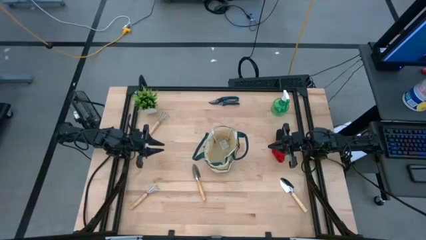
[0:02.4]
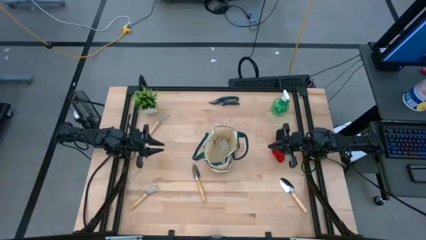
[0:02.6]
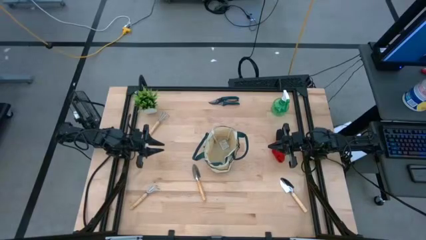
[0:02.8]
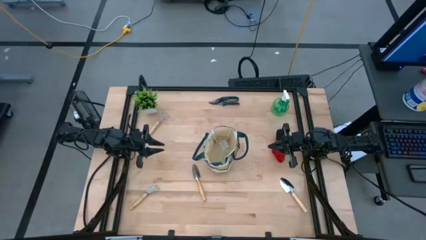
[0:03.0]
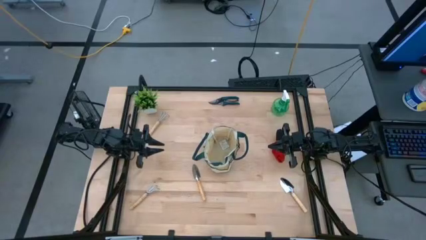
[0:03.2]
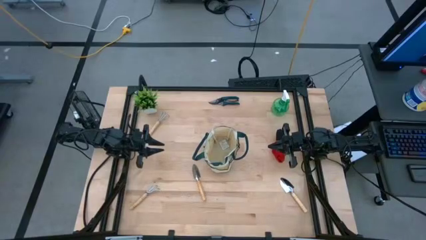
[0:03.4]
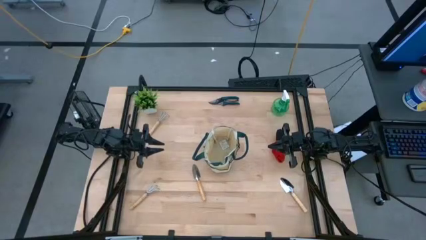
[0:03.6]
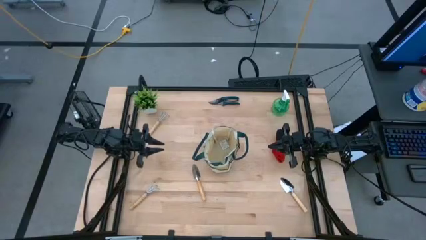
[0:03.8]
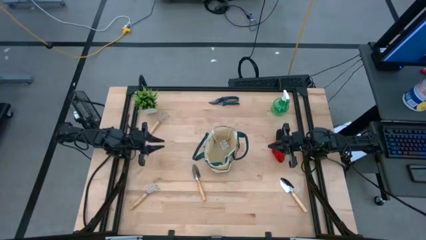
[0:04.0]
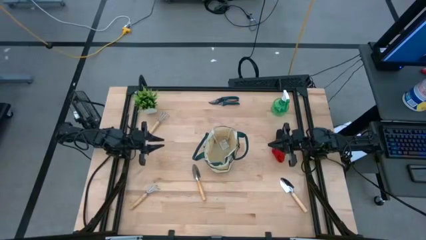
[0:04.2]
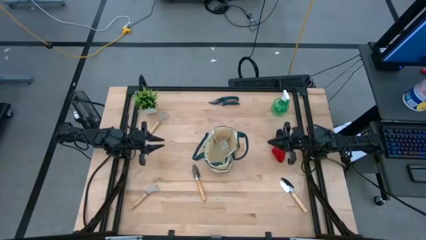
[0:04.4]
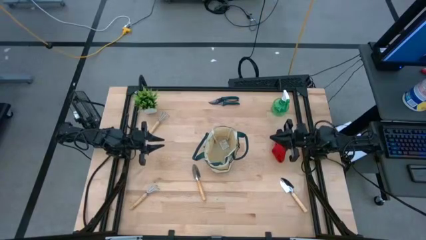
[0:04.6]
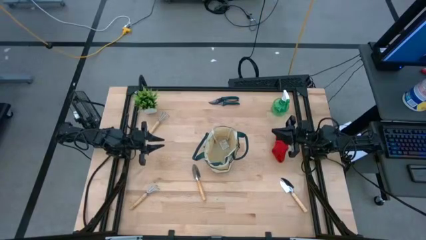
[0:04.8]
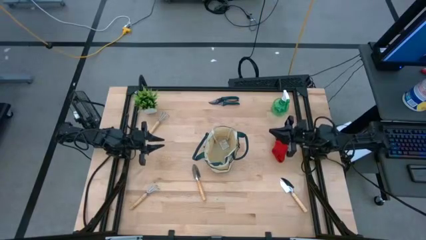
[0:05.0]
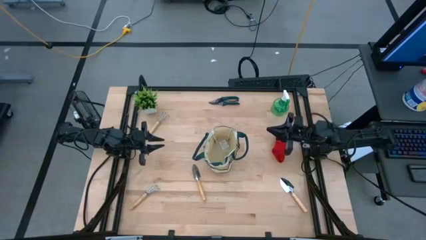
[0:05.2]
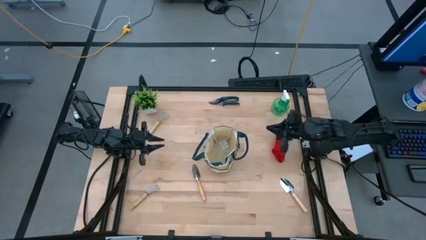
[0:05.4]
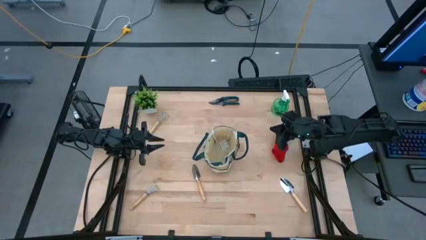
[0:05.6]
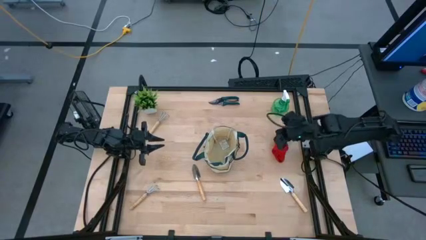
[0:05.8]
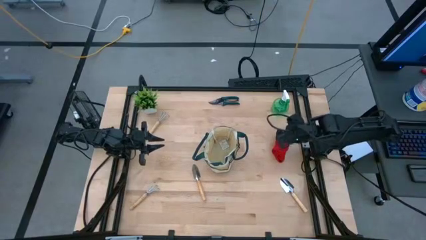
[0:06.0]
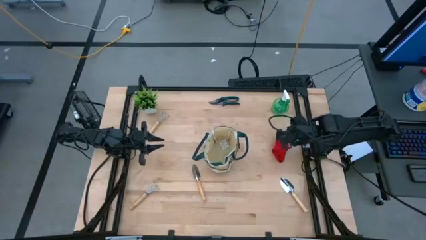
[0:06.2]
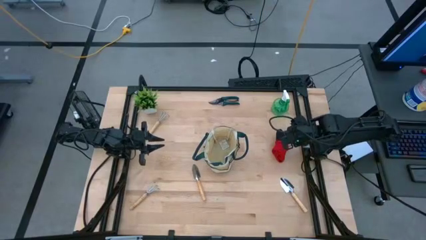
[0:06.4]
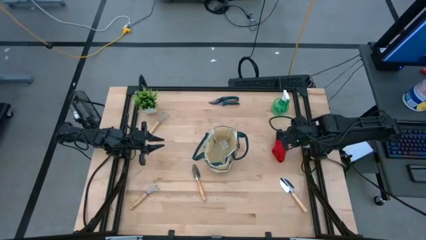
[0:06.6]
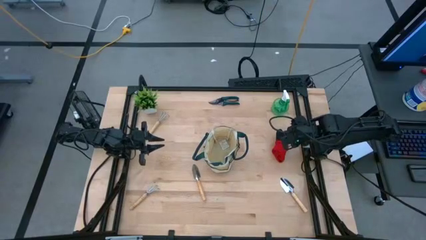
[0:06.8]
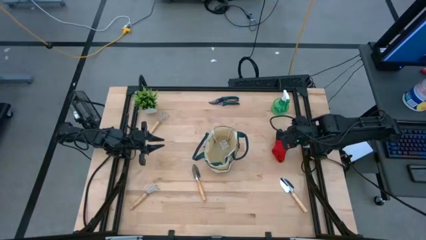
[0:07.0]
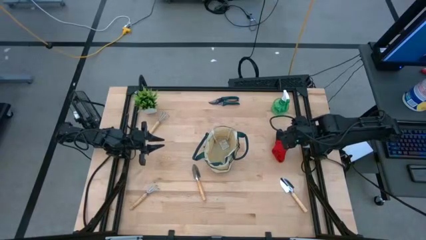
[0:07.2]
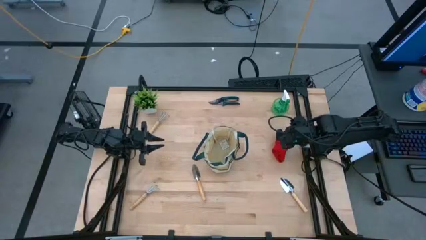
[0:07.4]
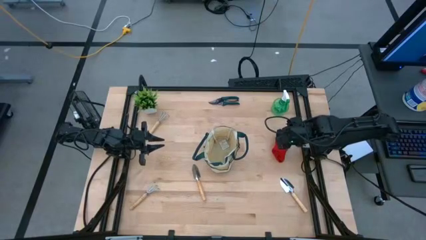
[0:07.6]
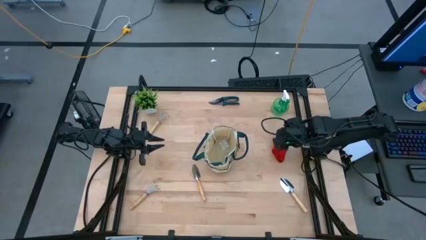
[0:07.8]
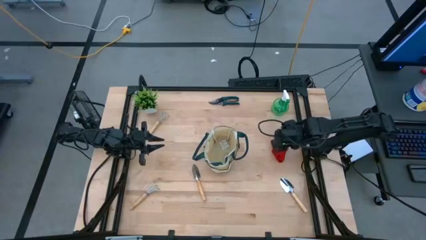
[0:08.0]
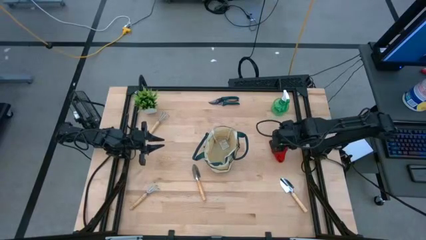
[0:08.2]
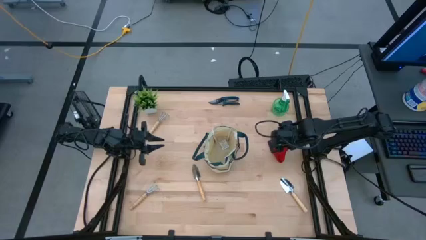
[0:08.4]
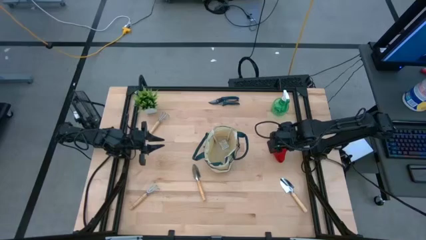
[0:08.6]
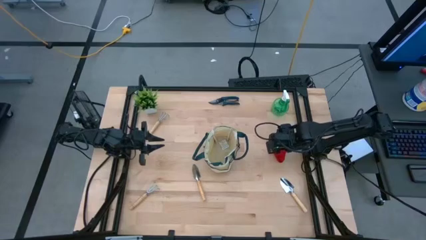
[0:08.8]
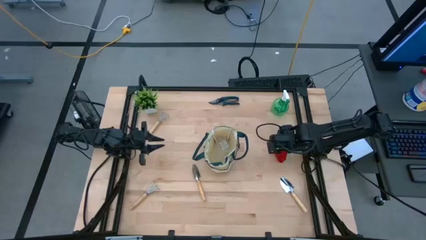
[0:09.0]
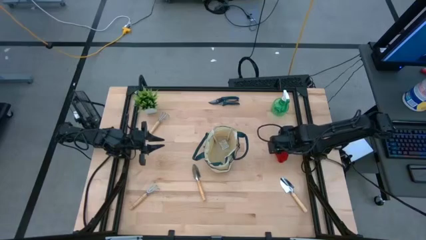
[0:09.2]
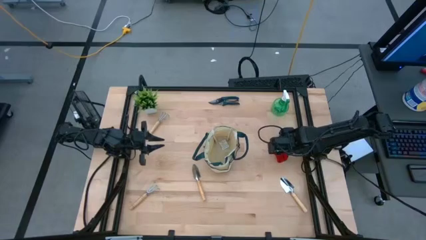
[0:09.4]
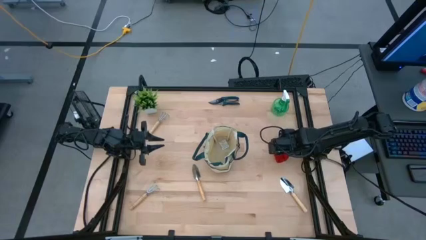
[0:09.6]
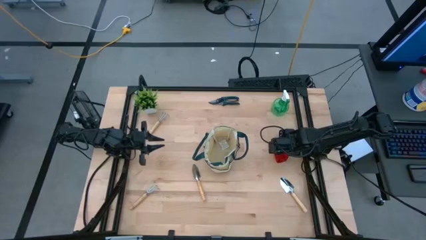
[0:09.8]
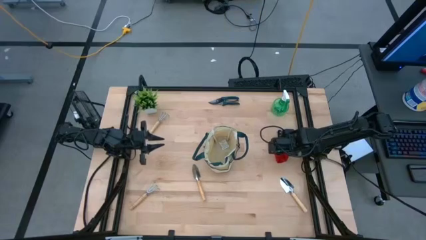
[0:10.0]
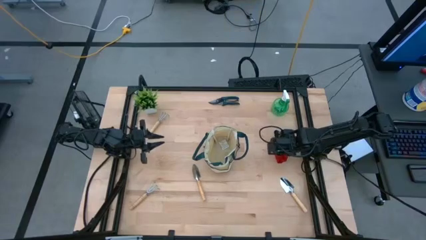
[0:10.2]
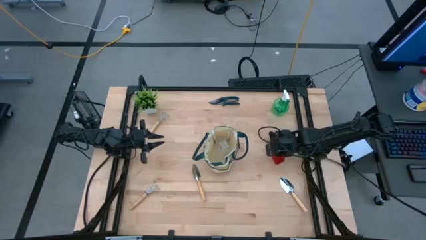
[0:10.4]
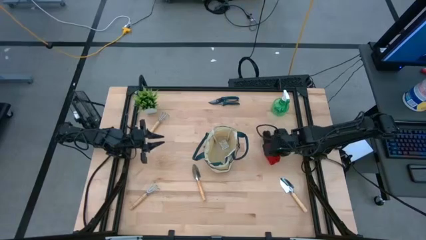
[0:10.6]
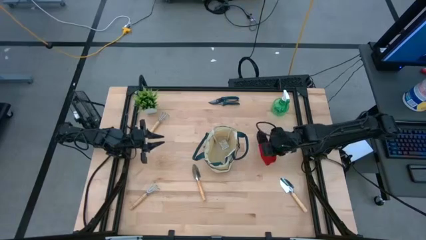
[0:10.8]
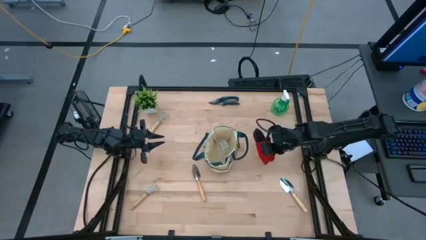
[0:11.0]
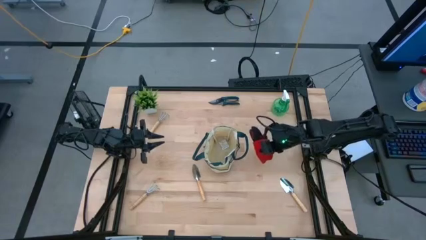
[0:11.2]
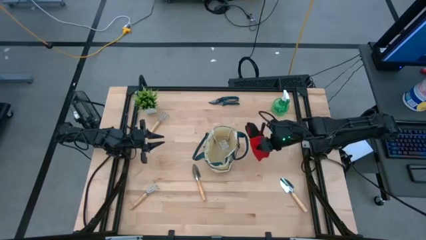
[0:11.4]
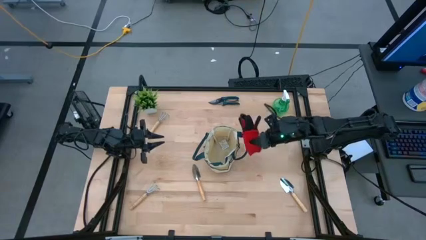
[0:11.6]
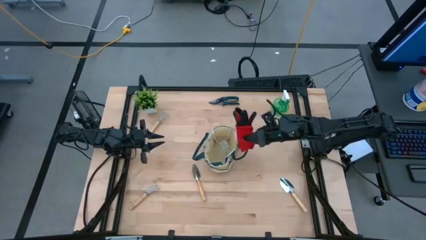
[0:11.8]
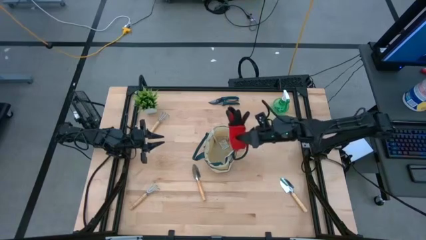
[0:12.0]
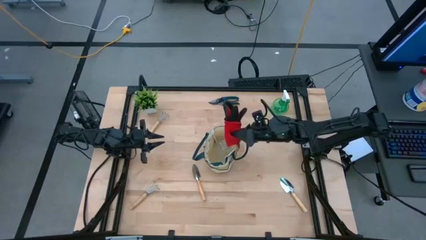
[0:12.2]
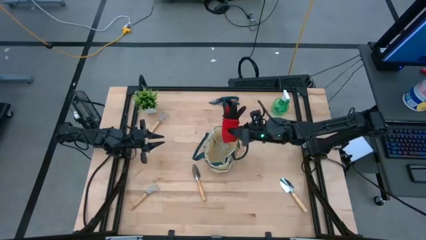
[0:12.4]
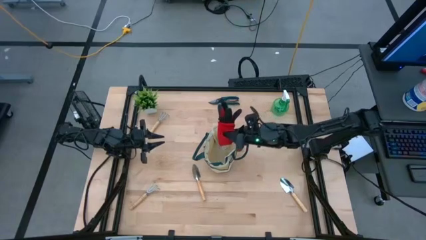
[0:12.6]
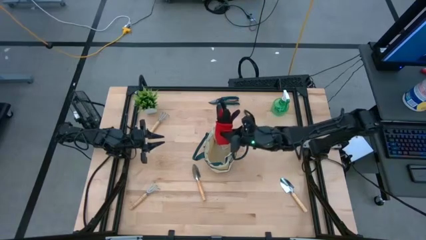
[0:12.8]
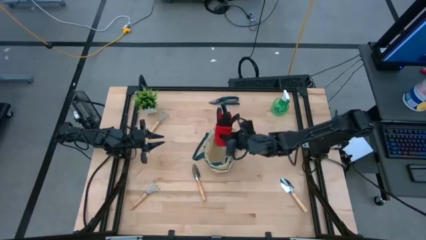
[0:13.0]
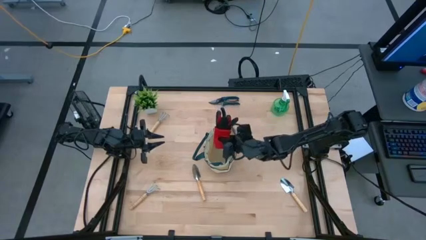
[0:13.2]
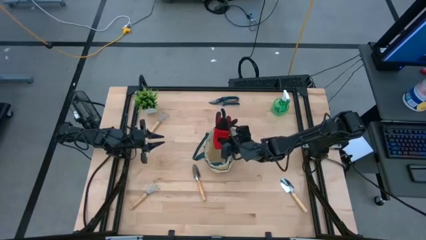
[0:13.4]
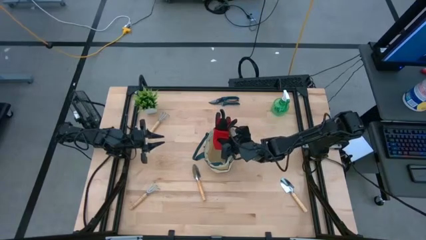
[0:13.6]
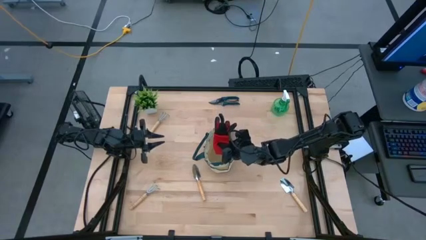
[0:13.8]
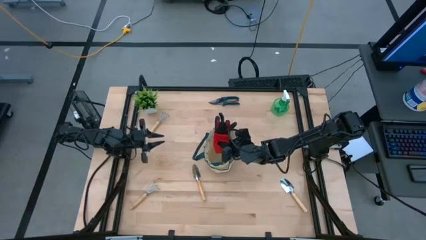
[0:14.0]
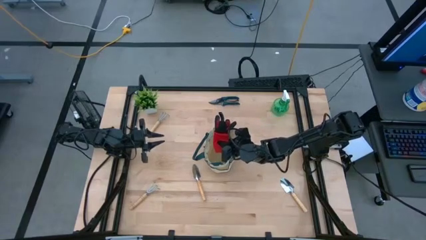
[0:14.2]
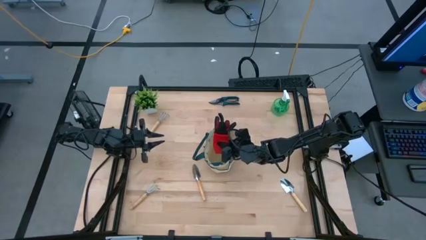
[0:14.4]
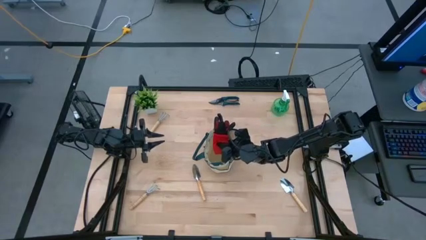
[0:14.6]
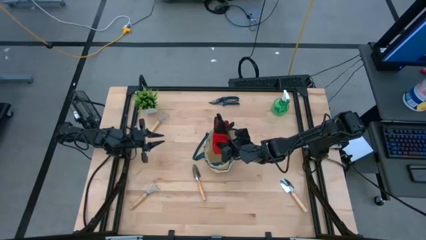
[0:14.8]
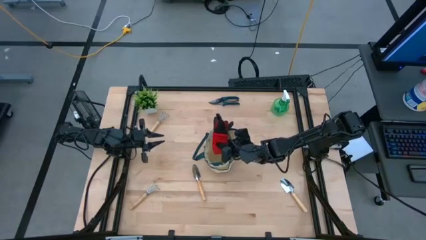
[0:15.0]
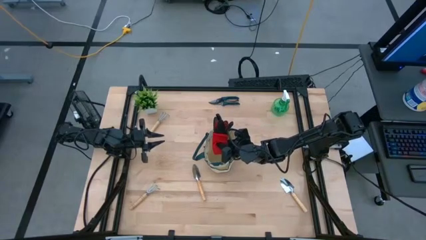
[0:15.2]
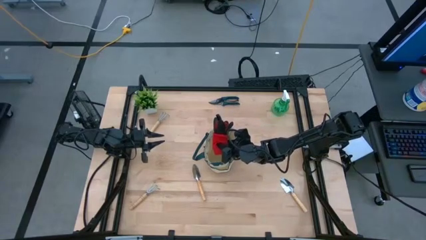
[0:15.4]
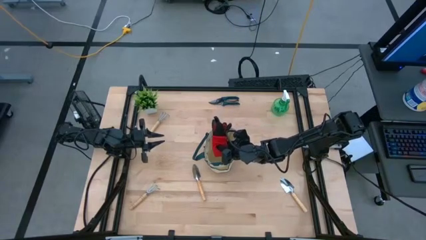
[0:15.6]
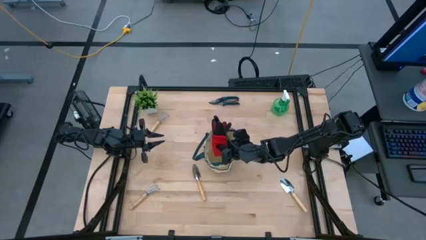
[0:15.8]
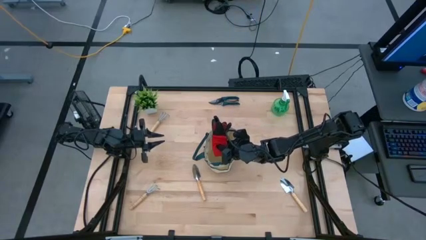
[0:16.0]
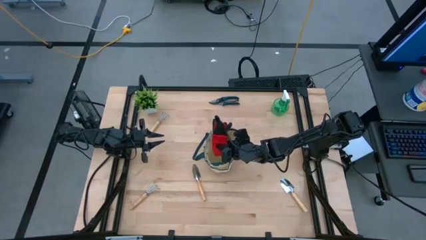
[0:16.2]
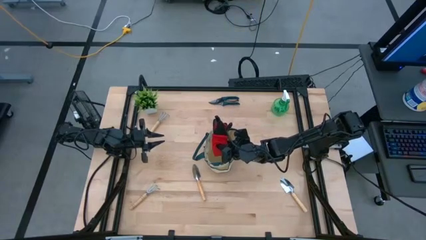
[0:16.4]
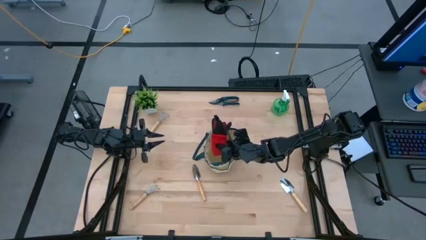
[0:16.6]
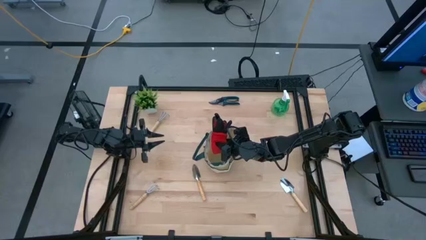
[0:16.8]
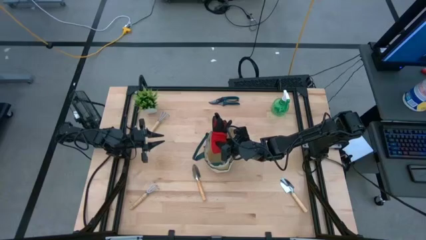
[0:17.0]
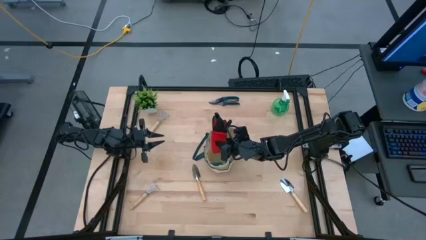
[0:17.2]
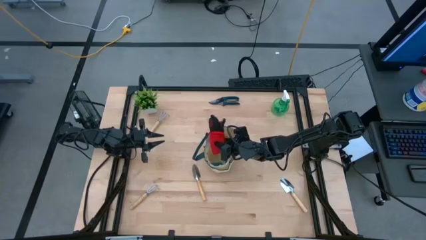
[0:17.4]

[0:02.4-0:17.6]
Task: Pick & Place Garden tools in Gardening bag
Put the red gloves into the gardening bag
